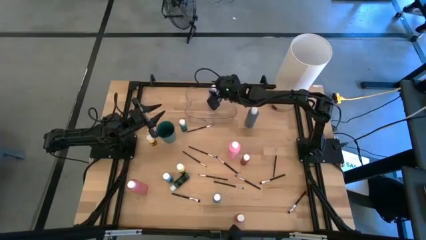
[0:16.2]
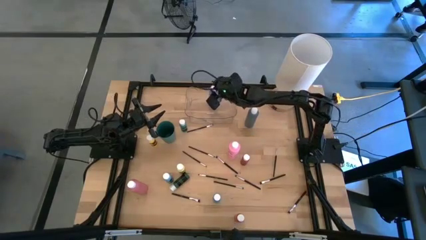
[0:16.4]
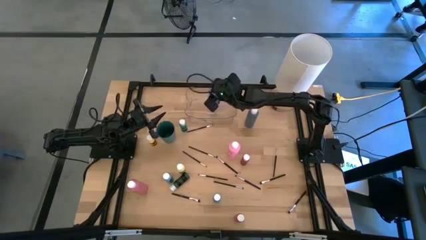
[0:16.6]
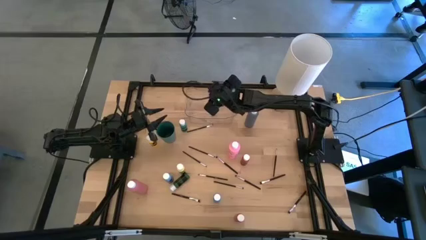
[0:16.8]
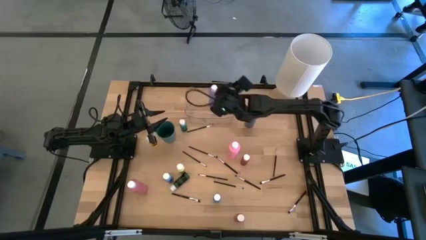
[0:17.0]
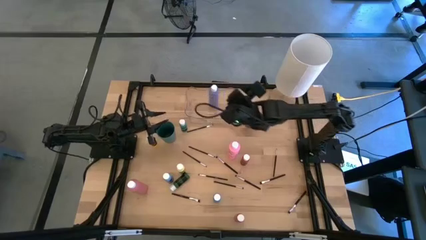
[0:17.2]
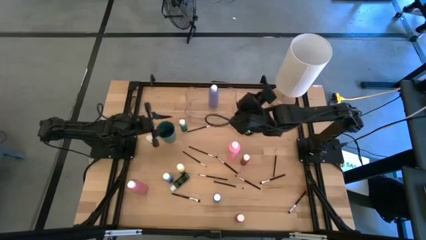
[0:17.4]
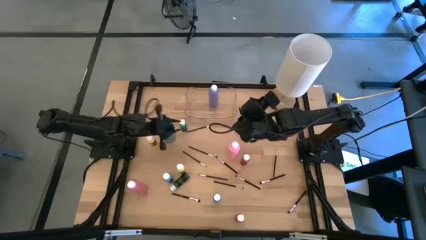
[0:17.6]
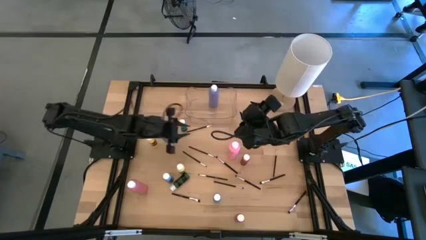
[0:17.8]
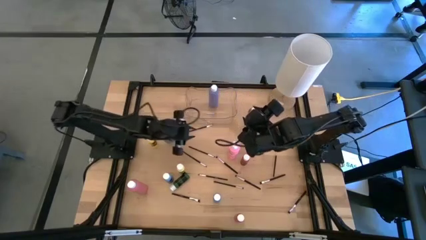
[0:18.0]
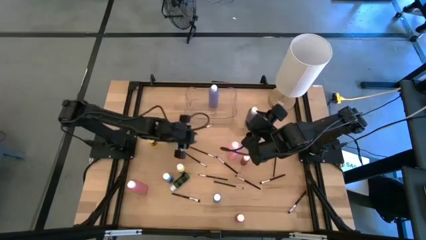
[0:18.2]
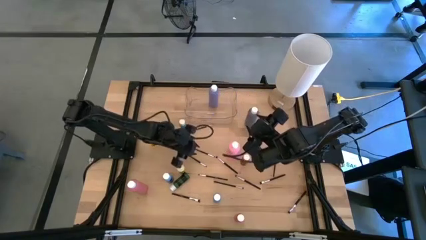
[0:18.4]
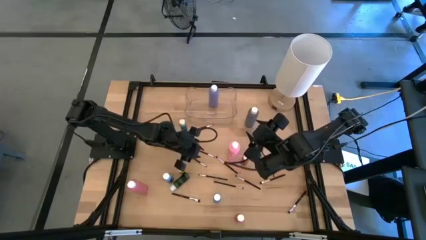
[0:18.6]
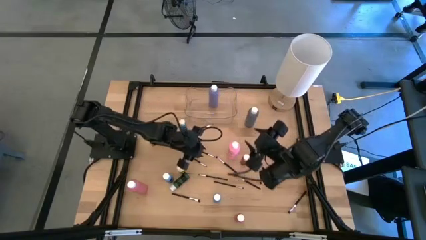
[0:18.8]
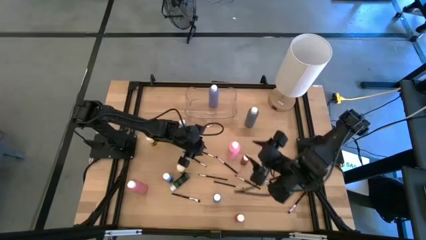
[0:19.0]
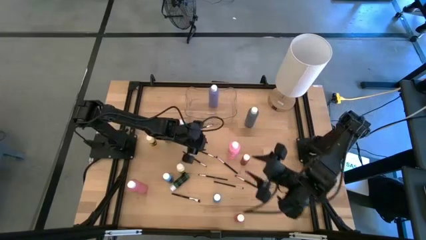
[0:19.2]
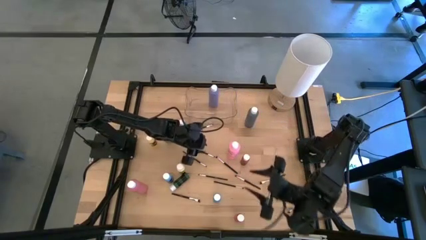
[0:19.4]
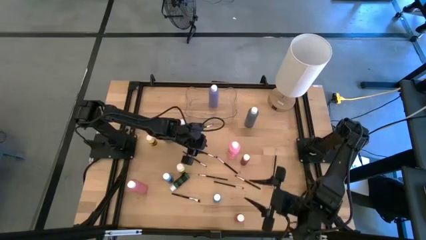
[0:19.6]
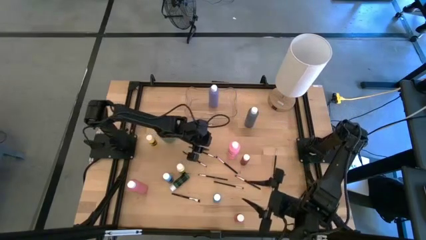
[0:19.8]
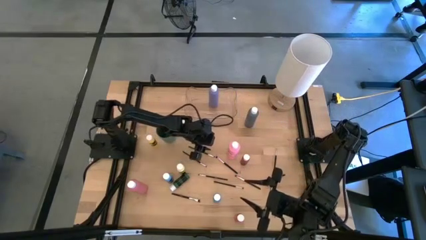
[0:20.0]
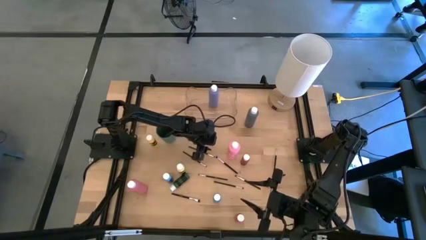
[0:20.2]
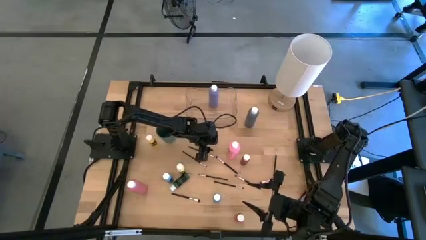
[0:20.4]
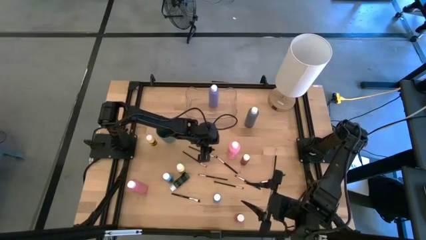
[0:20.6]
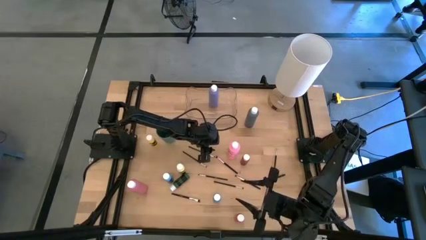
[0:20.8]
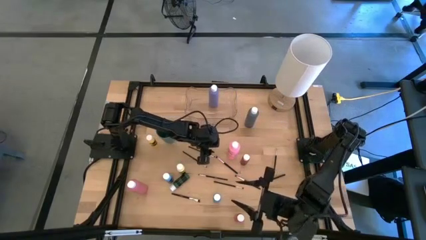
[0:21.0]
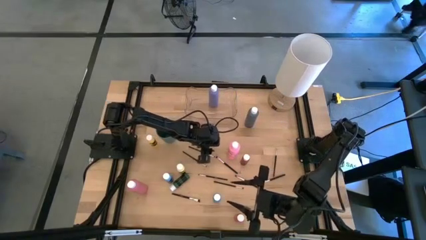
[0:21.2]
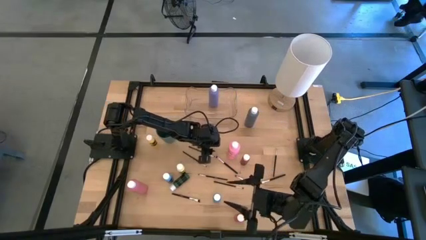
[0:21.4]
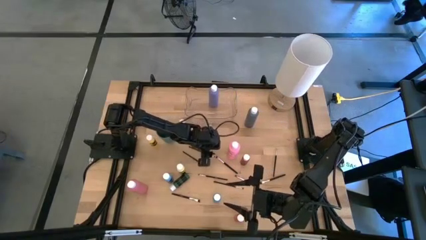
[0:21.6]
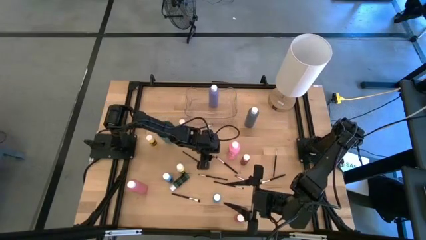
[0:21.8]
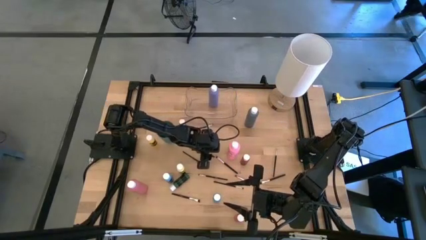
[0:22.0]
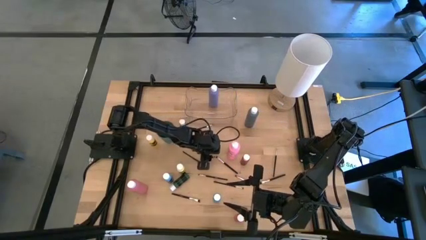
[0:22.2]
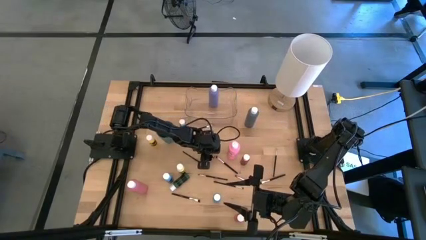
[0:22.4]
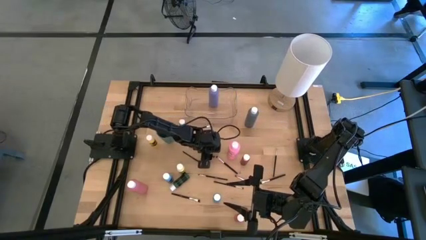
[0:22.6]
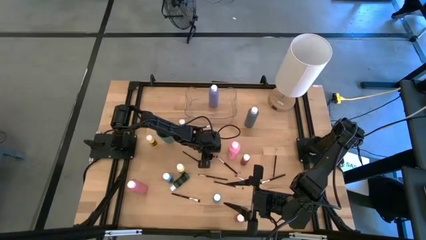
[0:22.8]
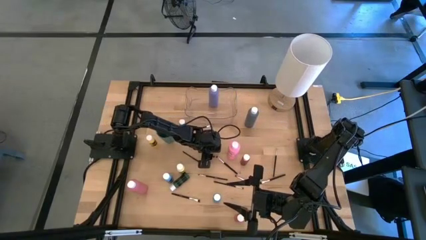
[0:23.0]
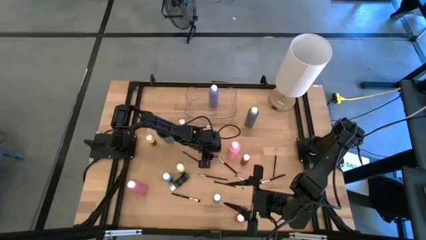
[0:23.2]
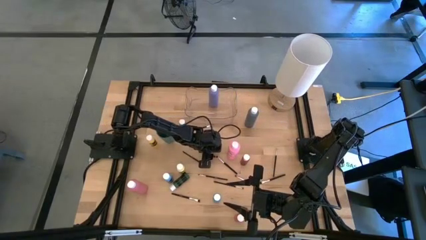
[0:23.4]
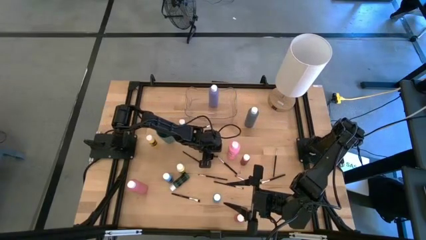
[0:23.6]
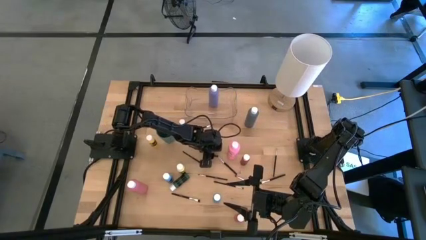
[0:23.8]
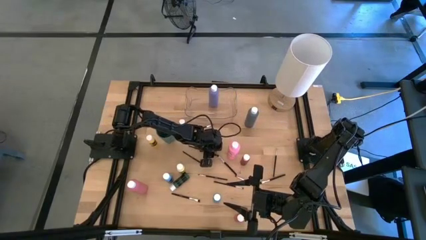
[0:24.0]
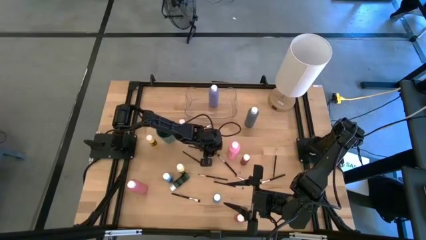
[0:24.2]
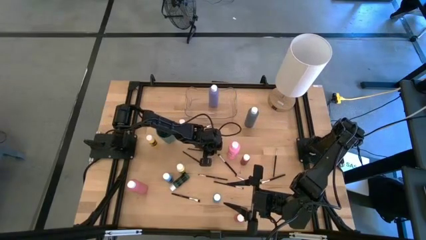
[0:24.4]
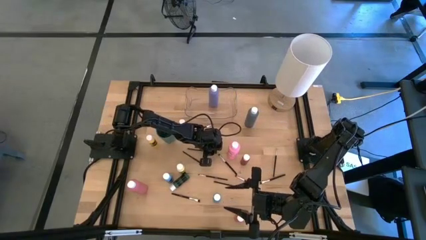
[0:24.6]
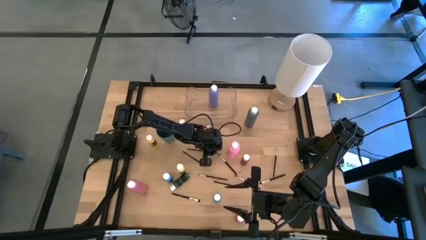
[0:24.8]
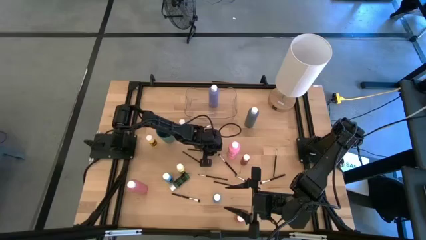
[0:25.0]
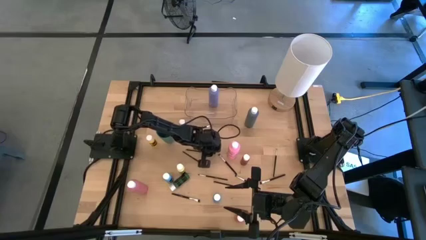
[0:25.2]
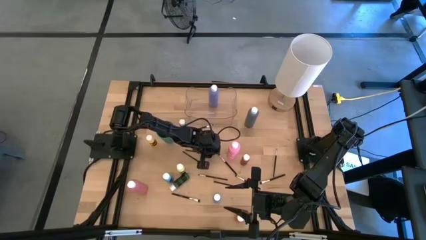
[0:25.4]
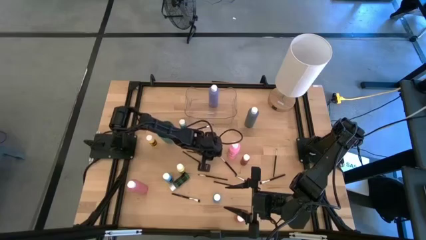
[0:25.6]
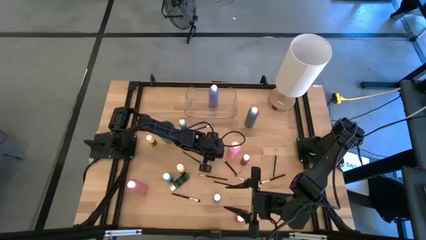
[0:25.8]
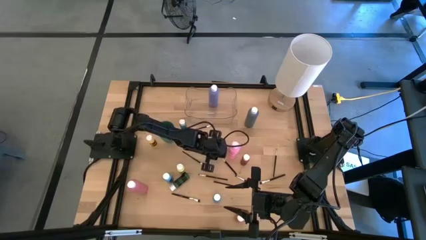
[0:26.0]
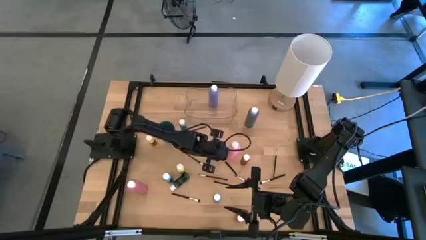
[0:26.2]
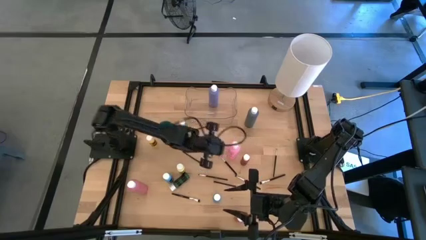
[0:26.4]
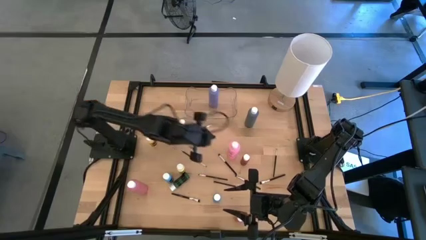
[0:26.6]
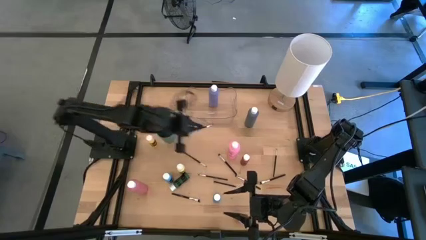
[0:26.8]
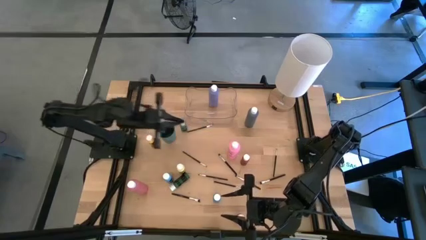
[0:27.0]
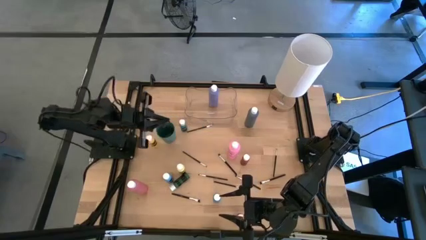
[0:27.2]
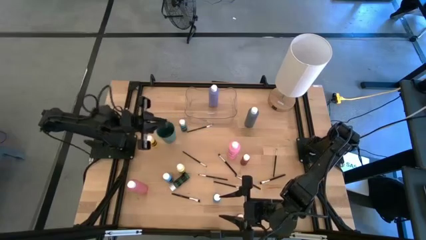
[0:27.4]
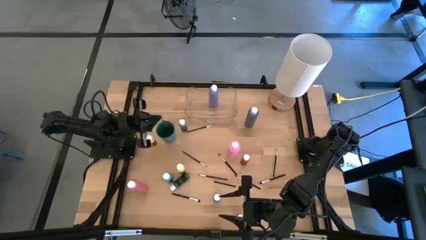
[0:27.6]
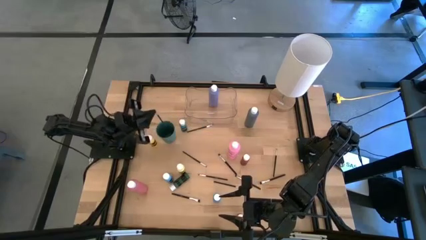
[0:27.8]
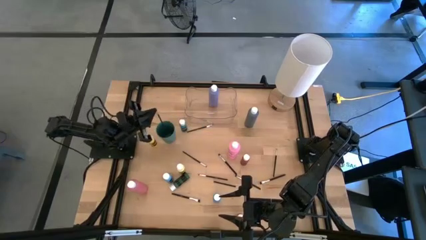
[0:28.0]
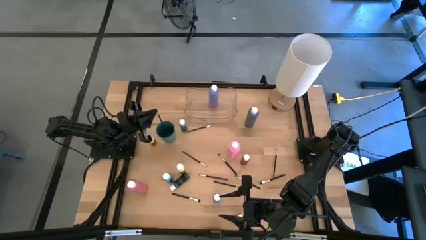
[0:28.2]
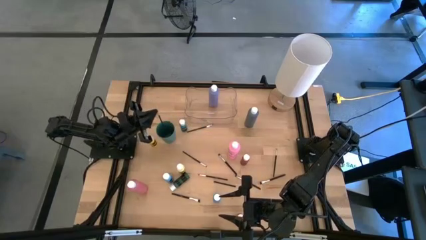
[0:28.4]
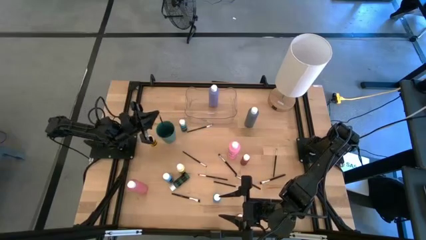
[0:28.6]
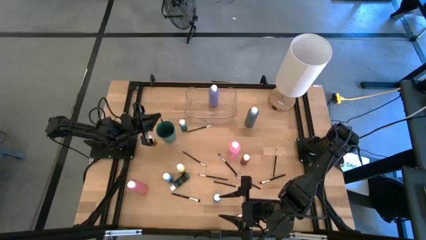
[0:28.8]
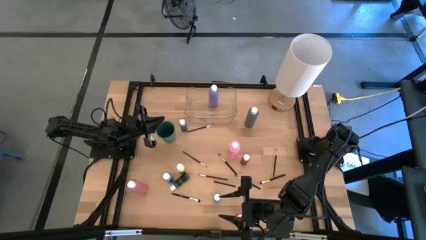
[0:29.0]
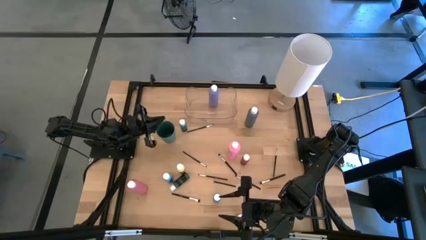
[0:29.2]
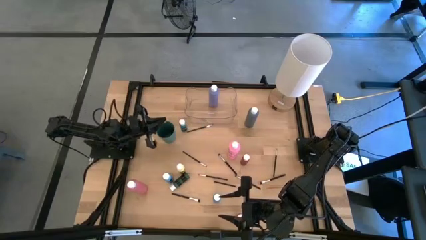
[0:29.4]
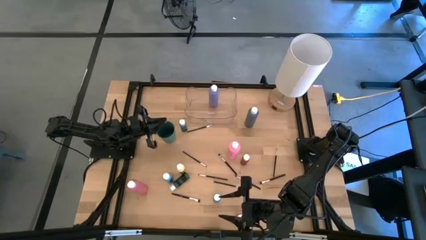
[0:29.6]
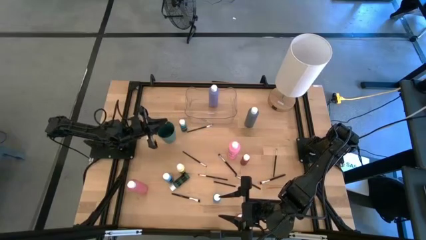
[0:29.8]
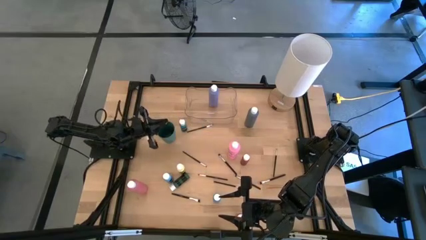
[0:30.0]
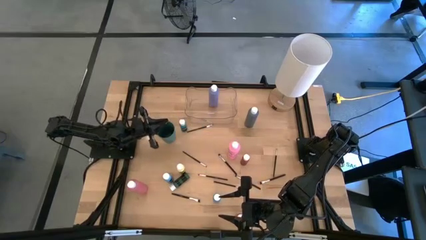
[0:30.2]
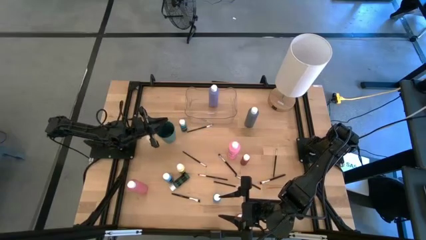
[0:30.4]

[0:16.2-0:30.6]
Task: Pick & Place Paint Supplies
Put the black paint brush into the green cup
